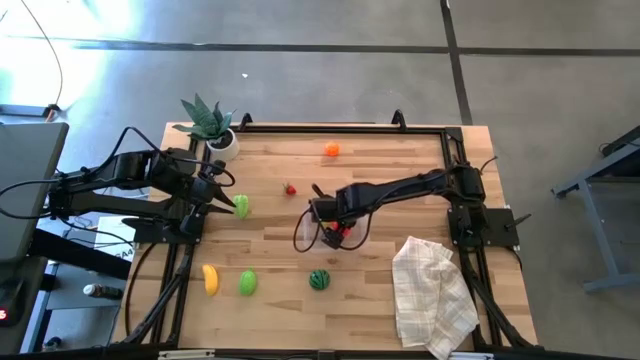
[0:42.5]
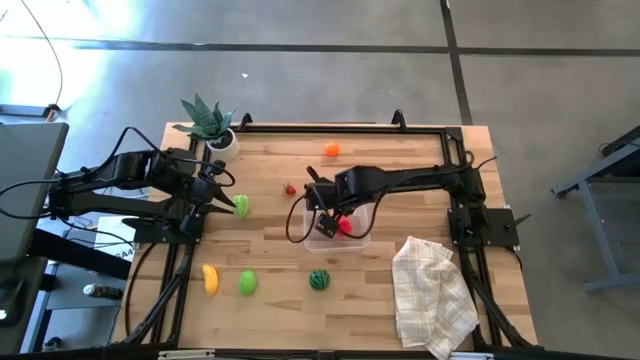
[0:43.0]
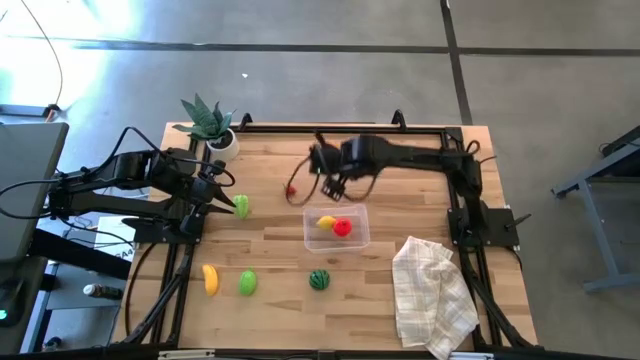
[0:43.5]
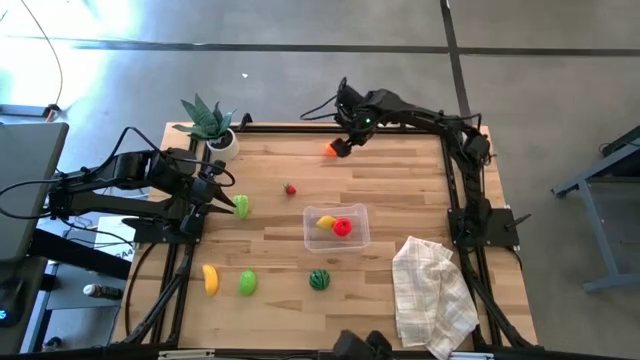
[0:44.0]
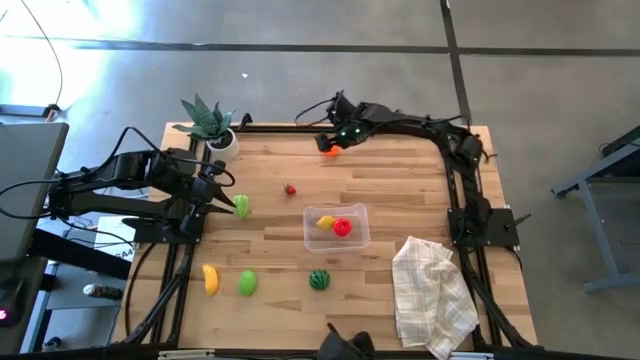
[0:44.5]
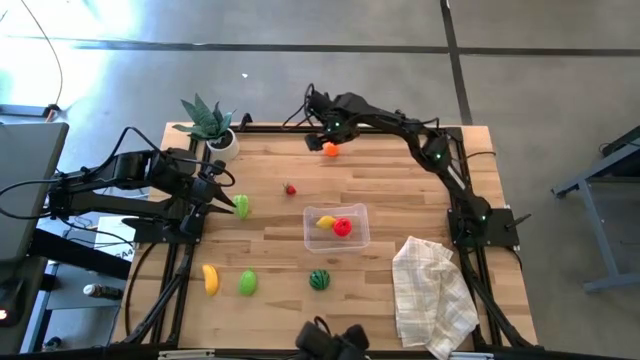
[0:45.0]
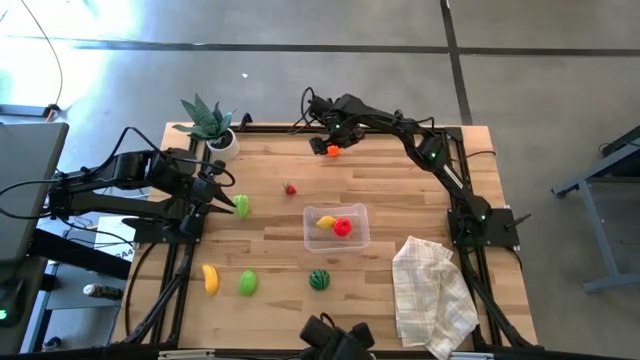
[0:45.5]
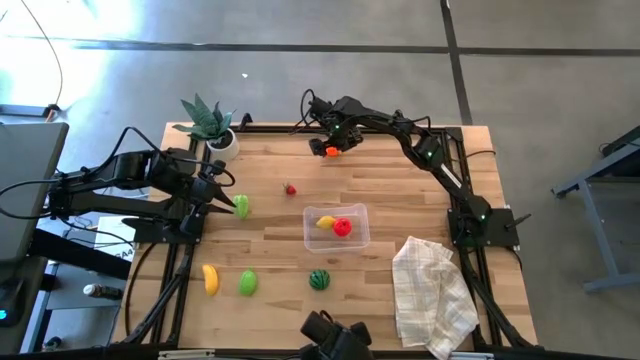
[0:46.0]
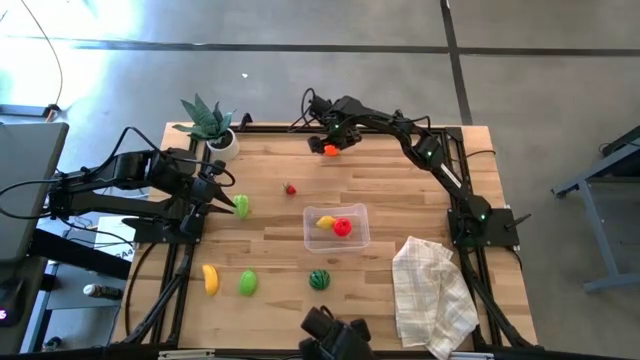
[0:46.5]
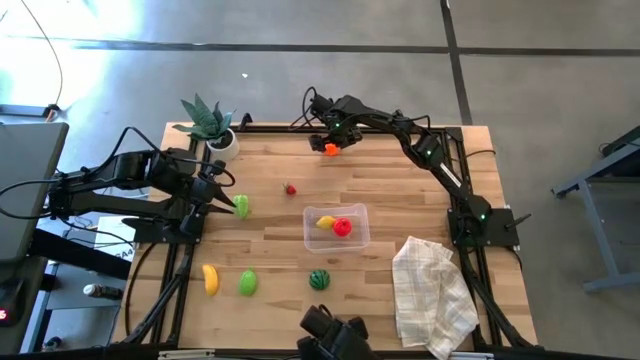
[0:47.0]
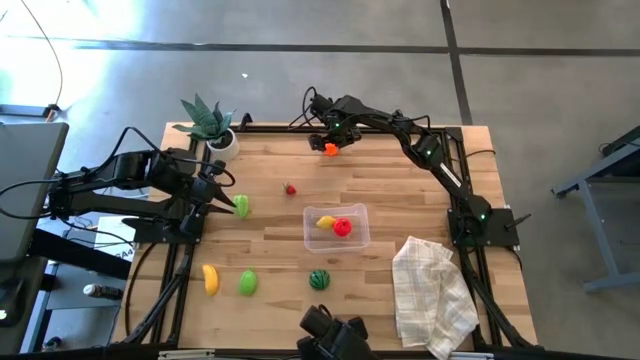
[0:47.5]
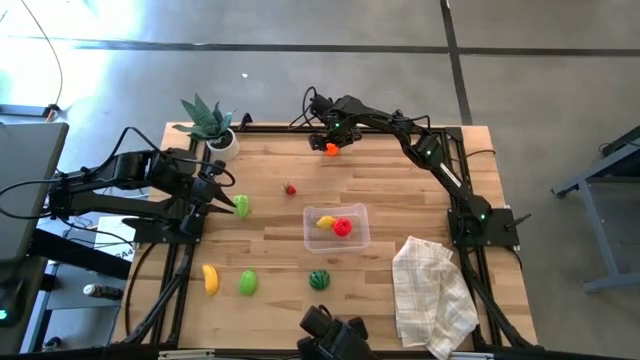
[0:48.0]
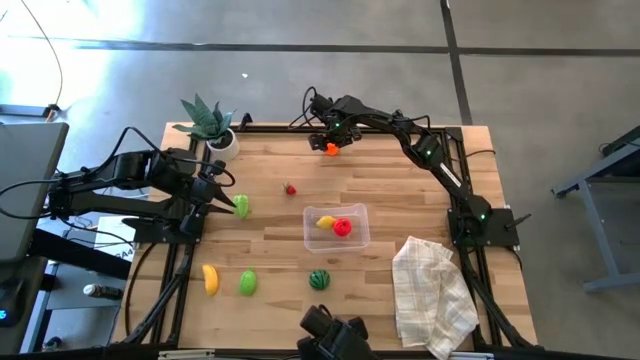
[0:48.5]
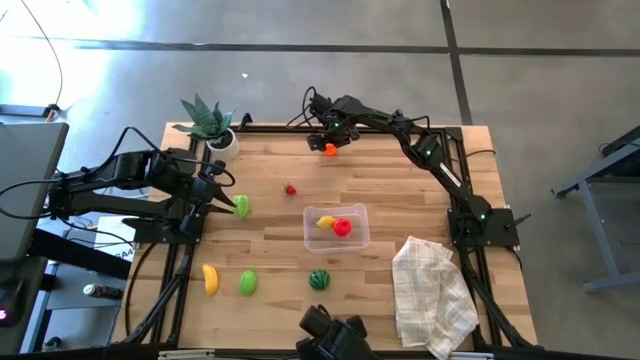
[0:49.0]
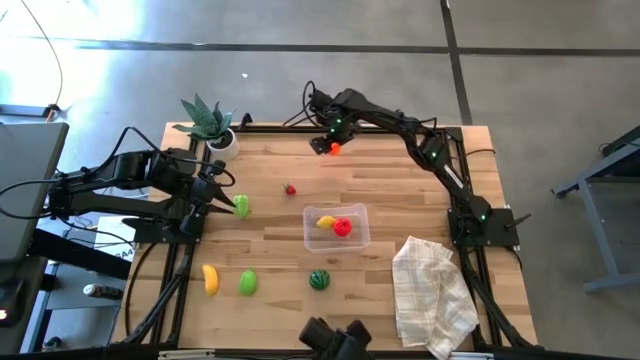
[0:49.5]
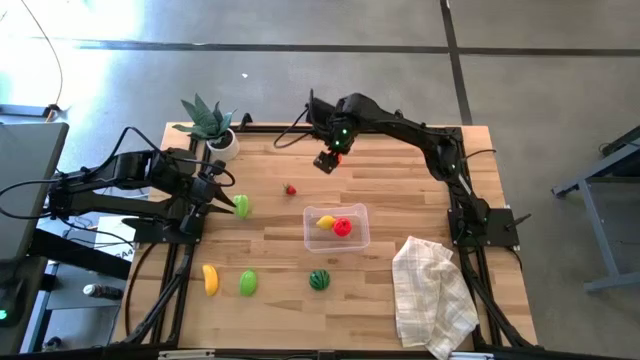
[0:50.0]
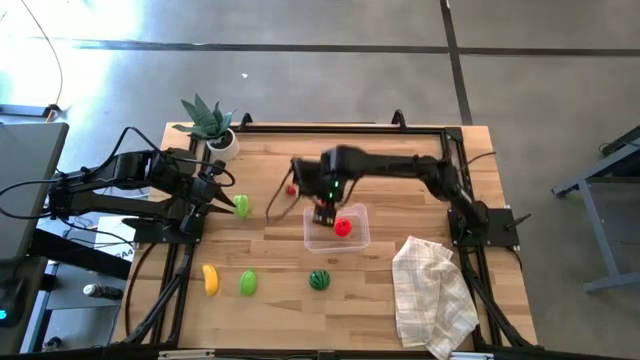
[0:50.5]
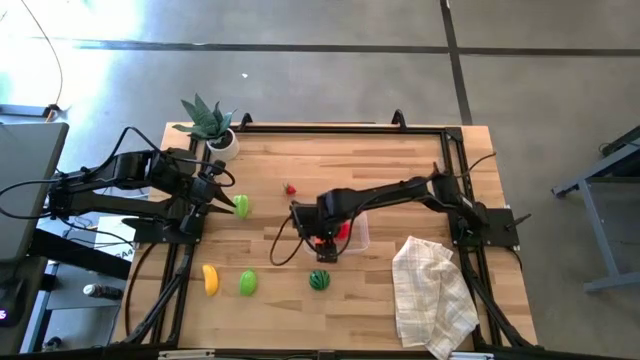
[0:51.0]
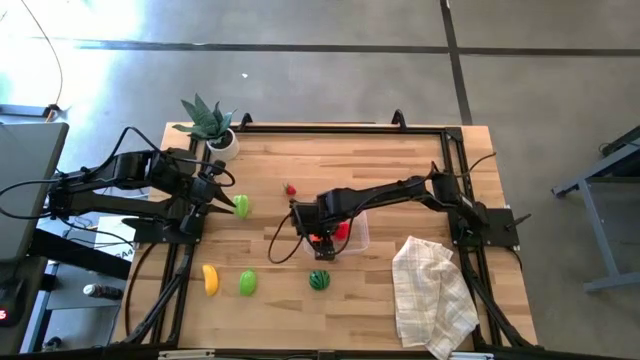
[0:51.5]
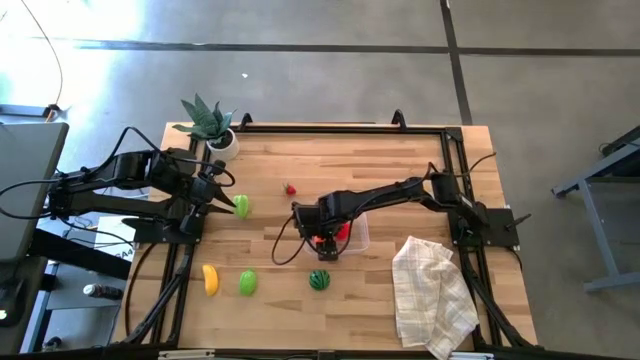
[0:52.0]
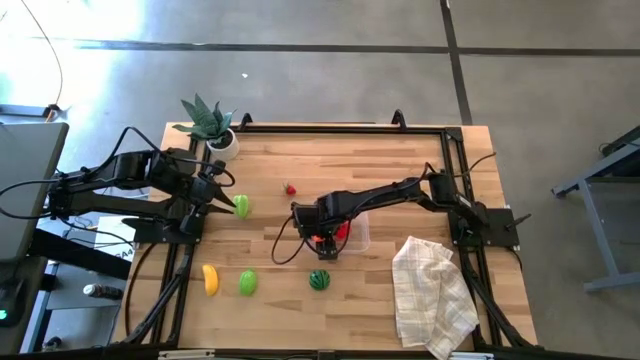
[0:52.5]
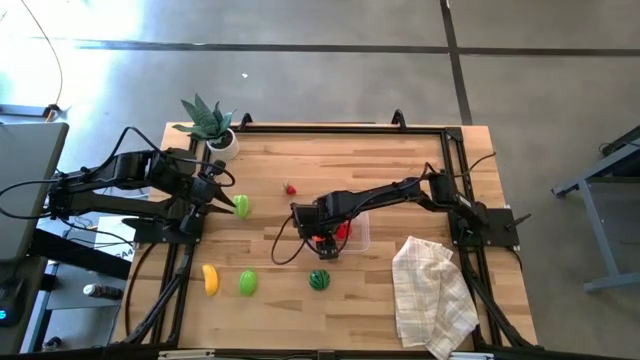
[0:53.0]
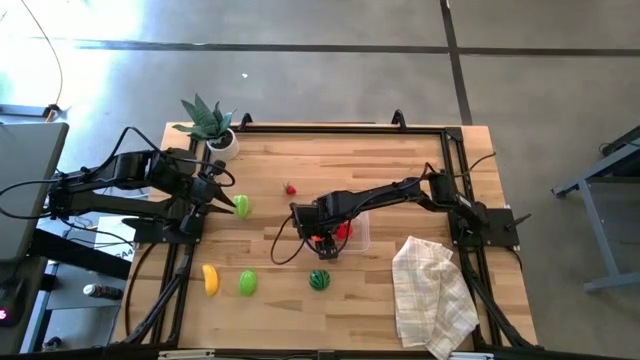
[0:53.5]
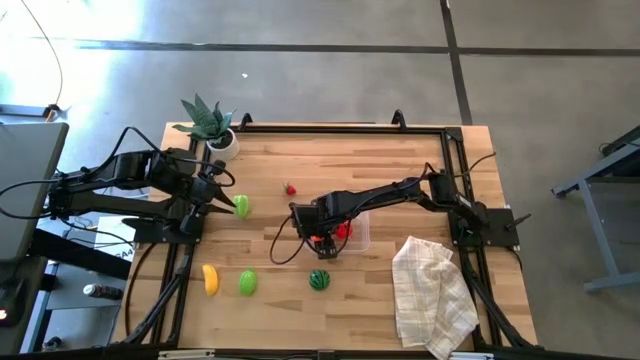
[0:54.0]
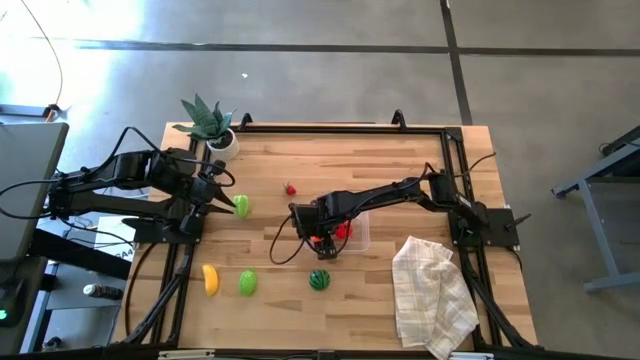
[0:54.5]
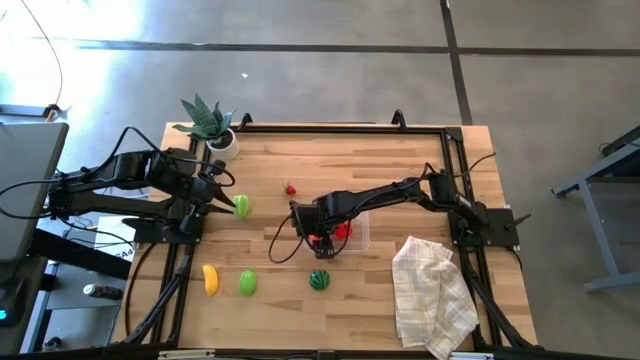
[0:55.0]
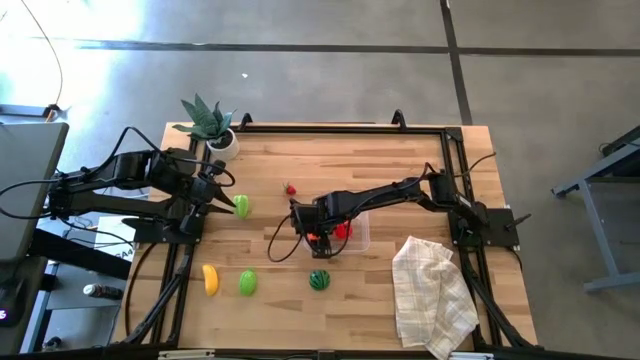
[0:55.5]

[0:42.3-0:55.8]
Task: Pick and placing Produce into tupperware
Put the orange pumpkin into the transparent bin

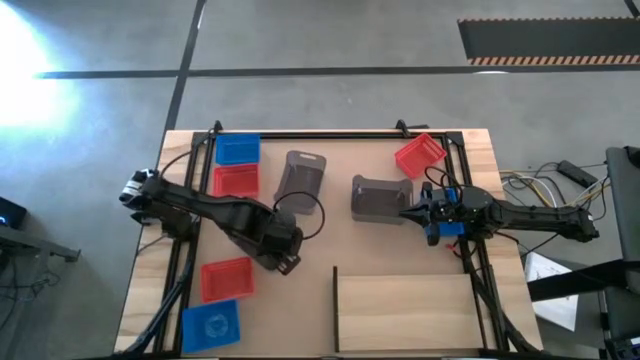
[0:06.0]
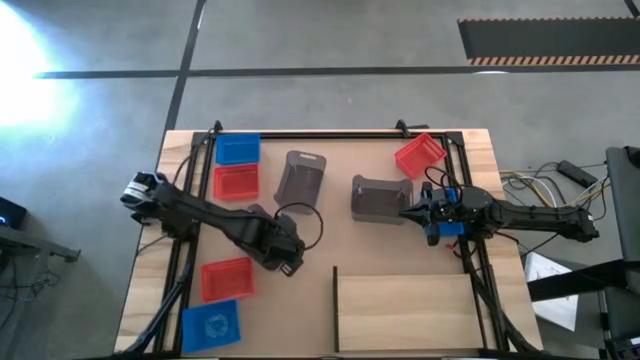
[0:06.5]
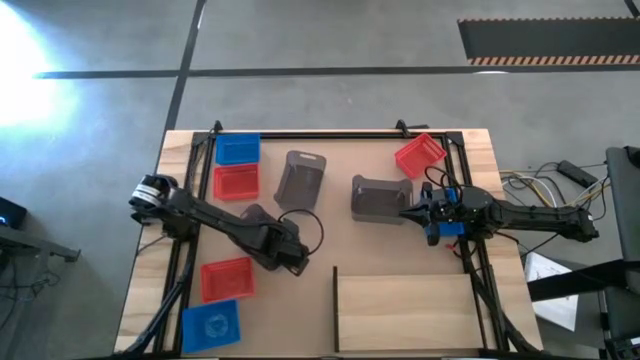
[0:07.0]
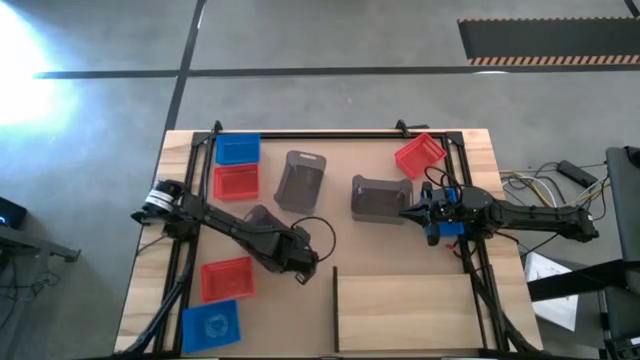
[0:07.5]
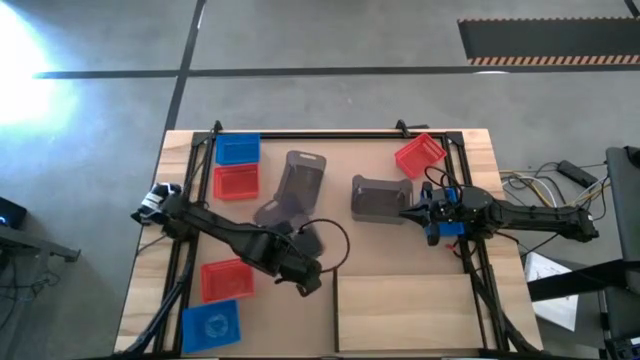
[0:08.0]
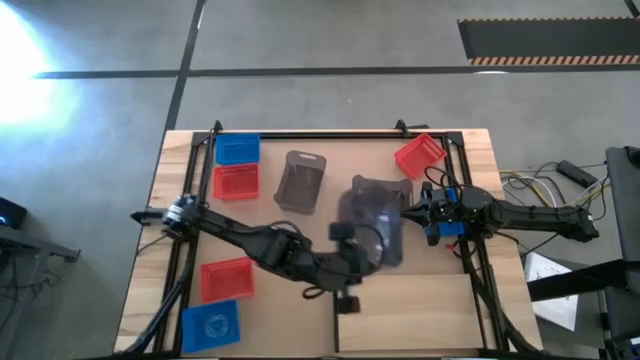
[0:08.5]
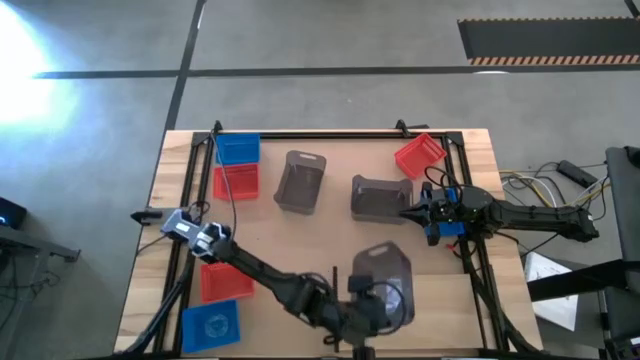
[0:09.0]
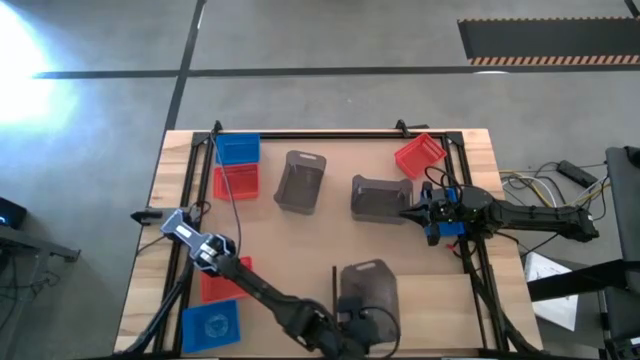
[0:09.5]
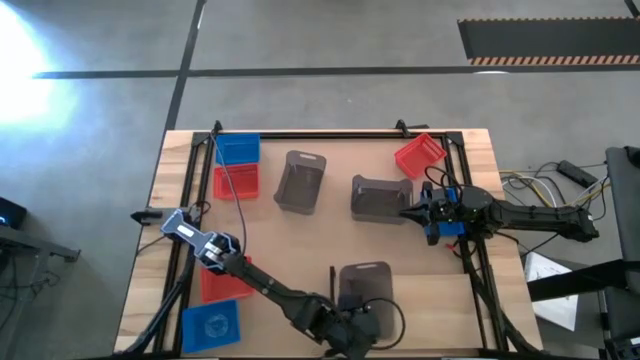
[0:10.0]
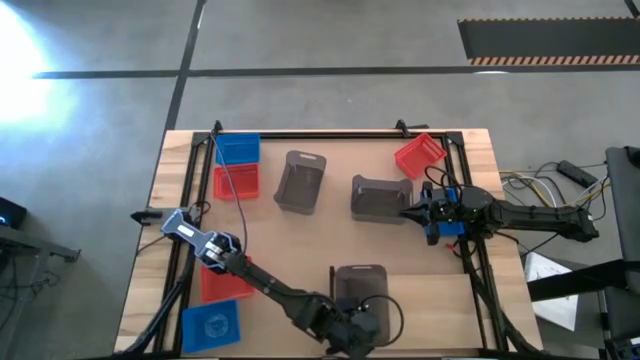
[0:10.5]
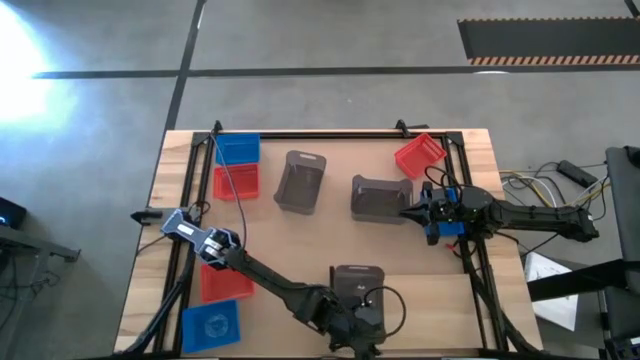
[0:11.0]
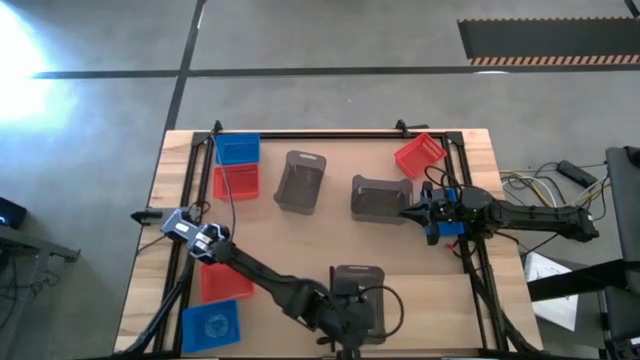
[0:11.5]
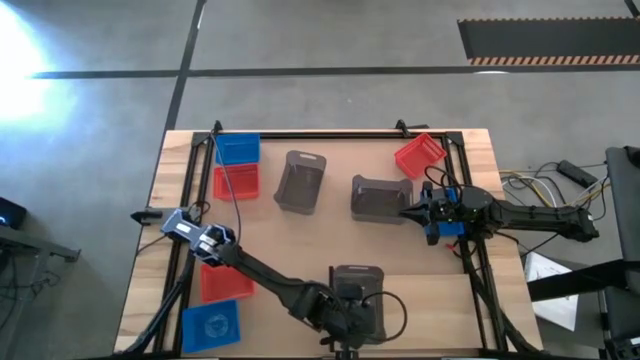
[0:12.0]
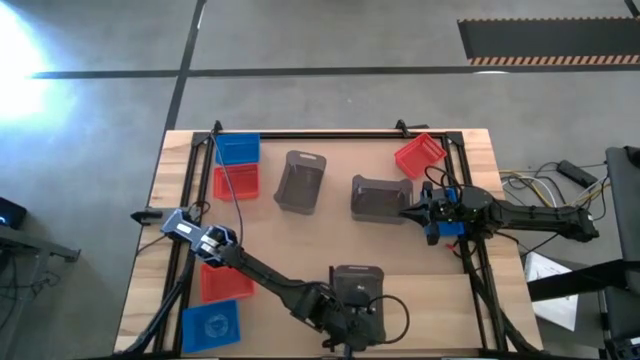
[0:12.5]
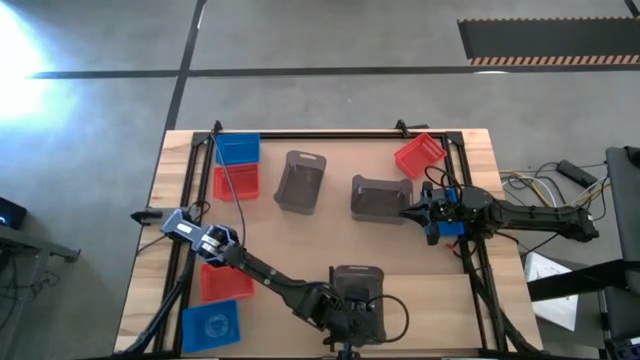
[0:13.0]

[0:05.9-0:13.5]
Task: Stack baskets on shelf by color
Put the left black bin on the shelf
